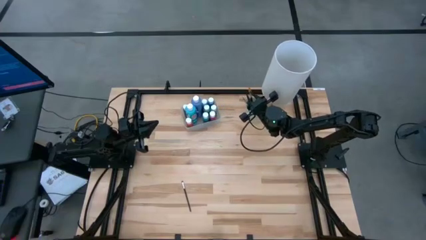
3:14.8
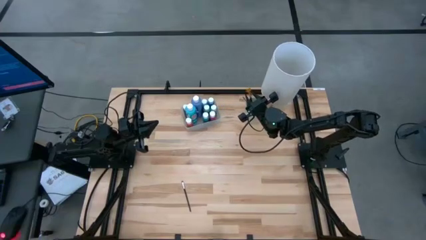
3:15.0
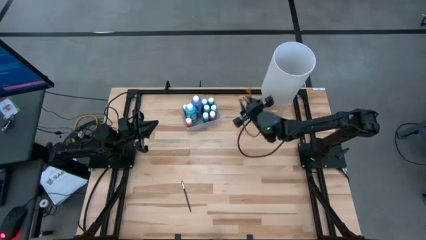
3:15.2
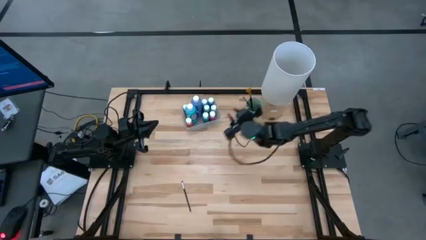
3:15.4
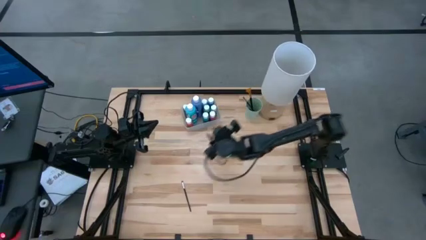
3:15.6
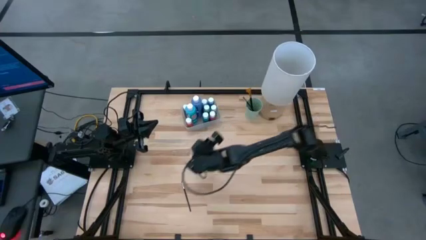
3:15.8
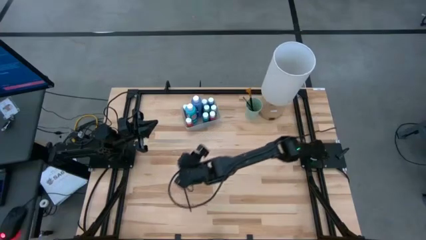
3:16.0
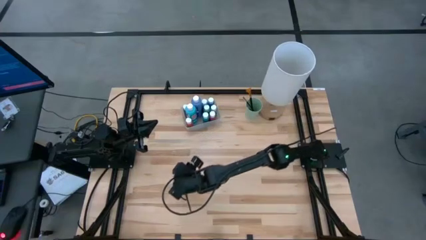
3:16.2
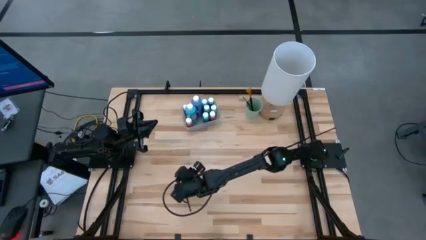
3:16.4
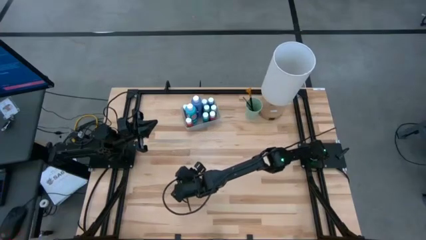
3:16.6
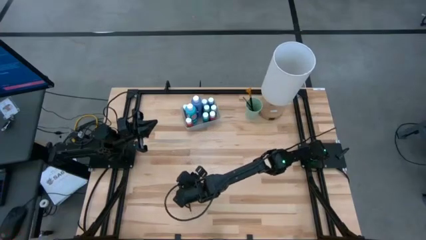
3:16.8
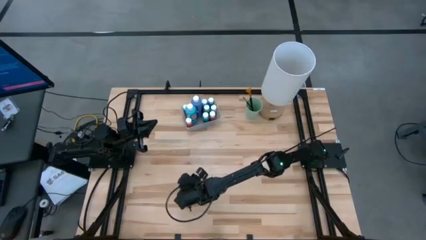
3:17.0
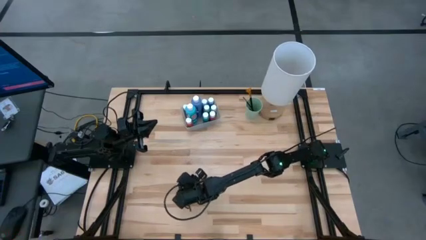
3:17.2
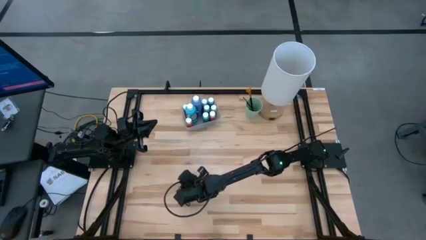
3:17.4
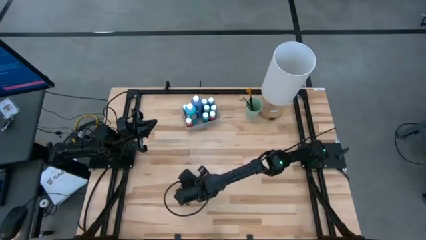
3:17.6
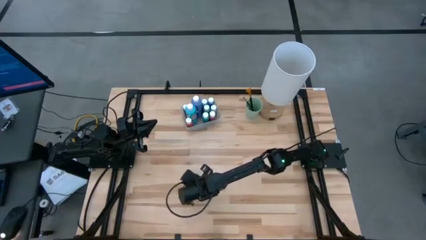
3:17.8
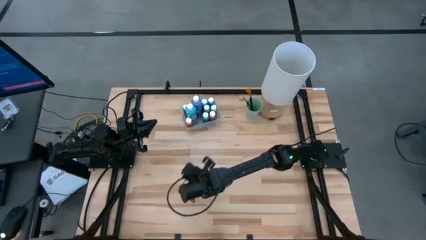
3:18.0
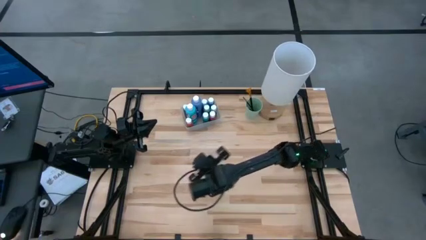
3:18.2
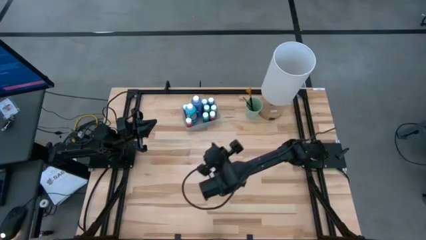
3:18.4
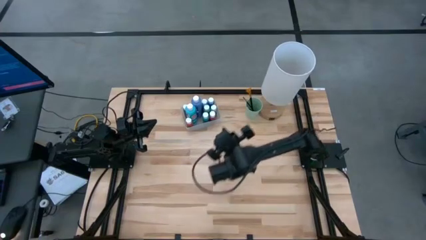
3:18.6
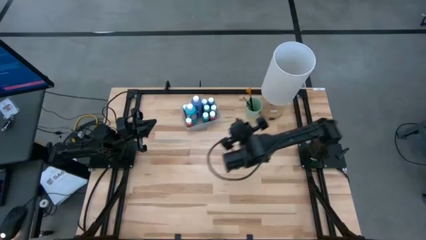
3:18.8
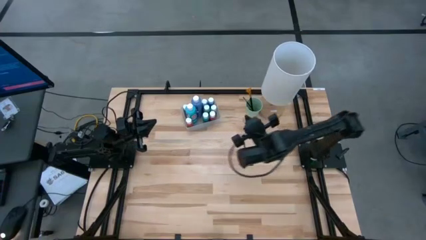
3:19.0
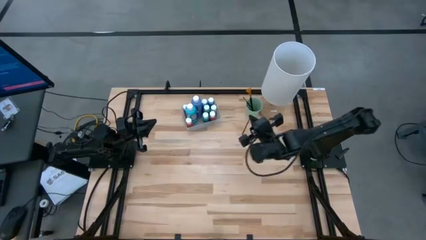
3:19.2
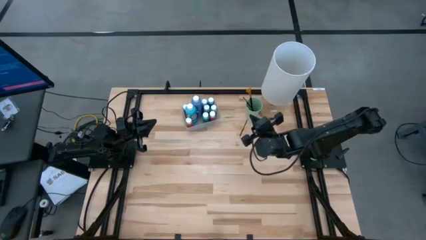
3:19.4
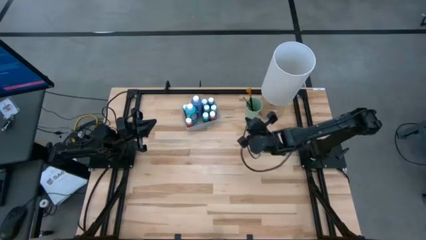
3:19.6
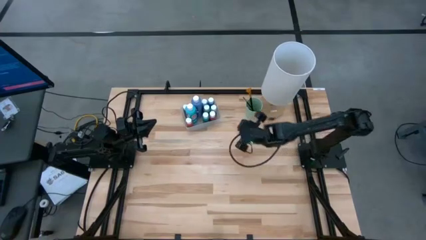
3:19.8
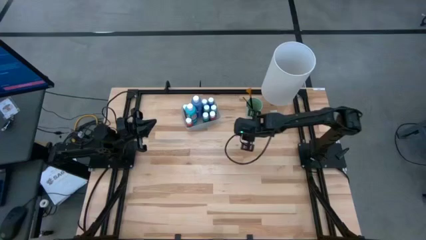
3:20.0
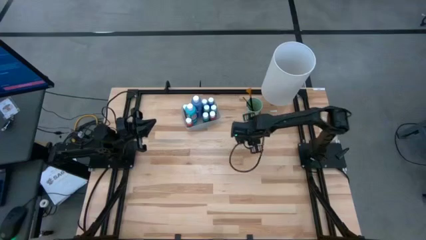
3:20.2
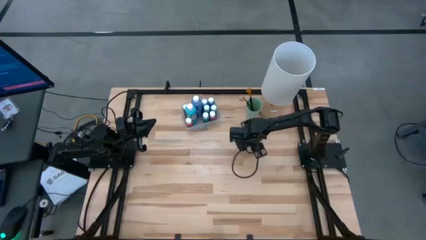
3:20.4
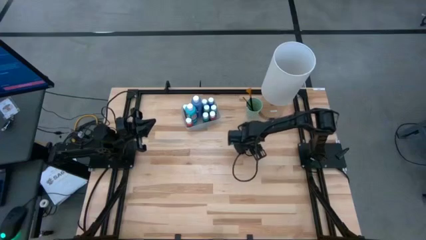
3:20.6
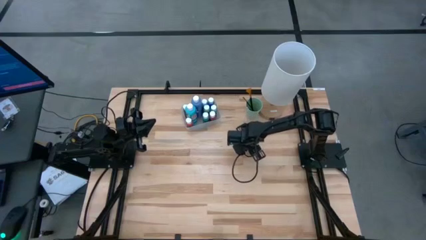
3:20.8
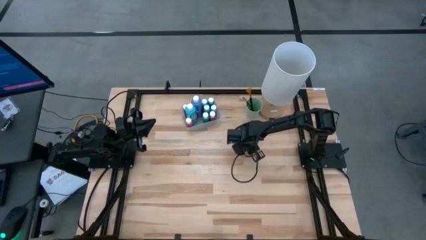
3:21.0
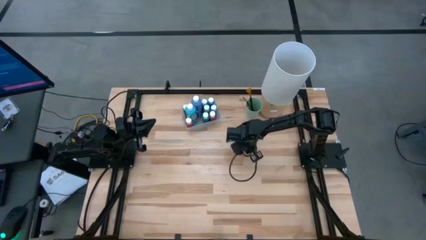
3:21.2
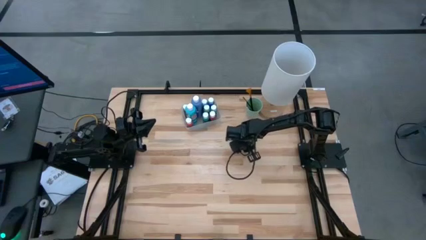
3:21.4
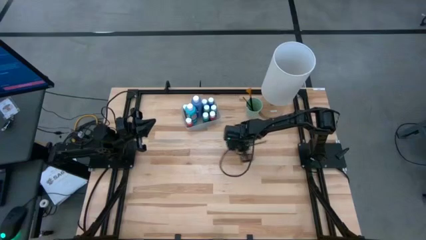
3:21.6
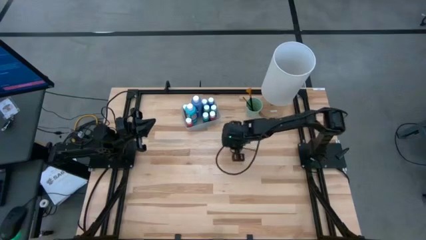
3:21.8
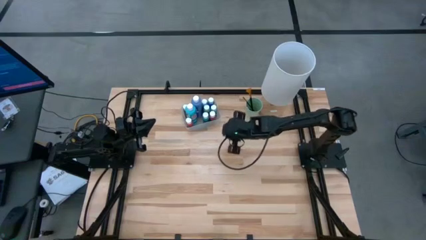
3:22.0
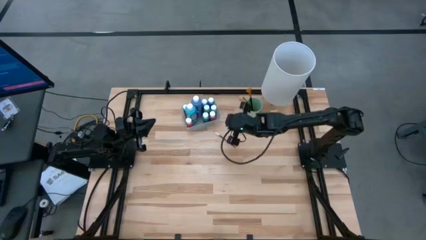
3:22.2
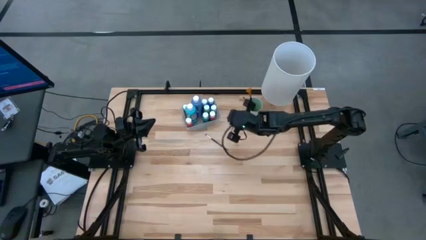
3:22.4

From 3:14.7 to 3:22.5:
Task: Pick & Place Paint Supplies
Put the silver paintbrush into the green cup

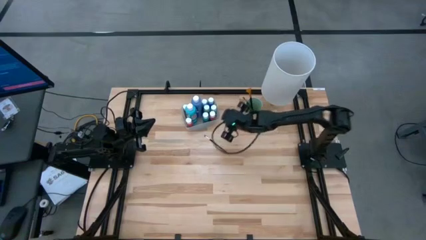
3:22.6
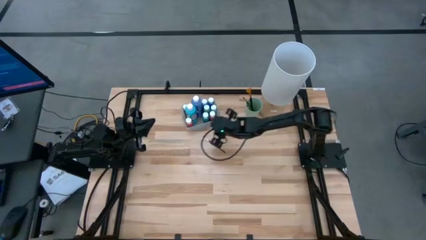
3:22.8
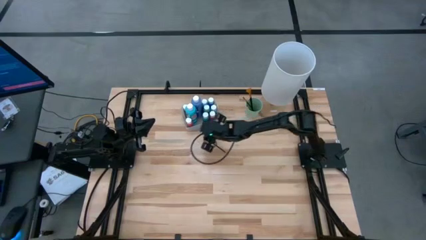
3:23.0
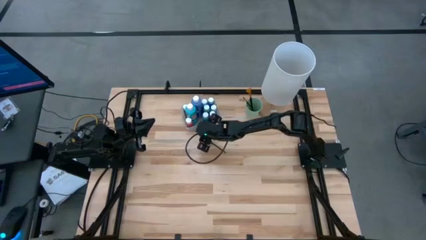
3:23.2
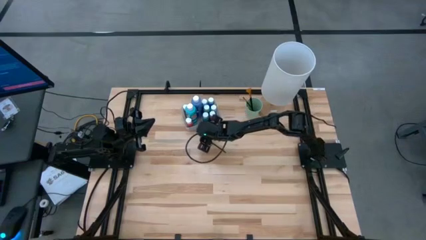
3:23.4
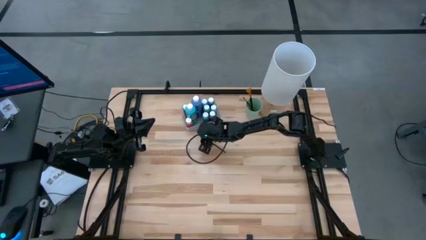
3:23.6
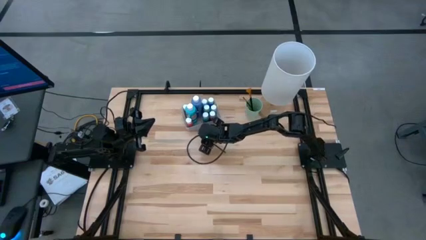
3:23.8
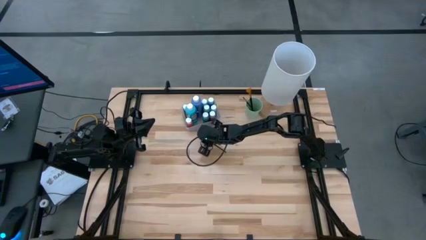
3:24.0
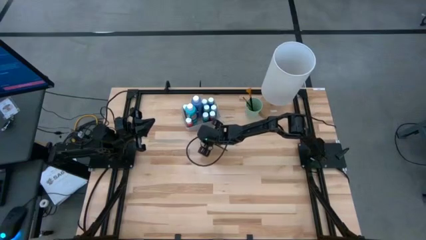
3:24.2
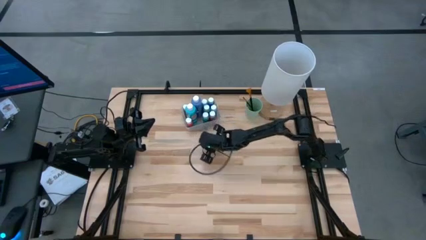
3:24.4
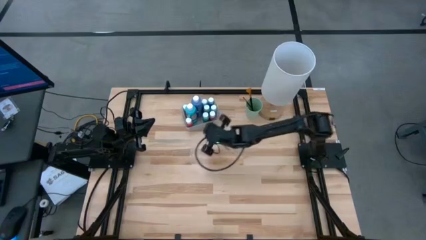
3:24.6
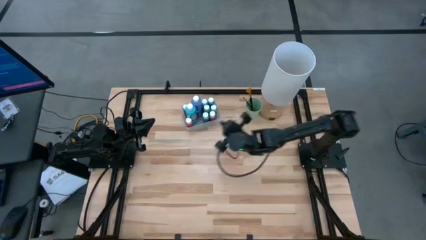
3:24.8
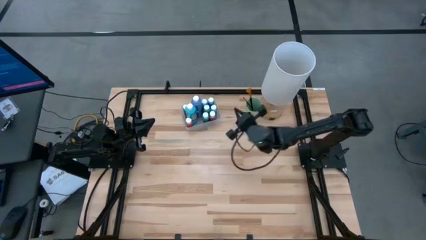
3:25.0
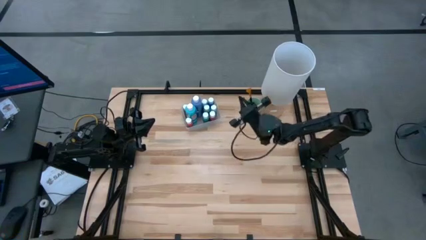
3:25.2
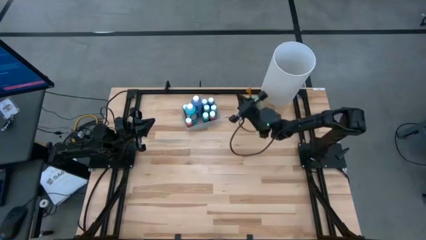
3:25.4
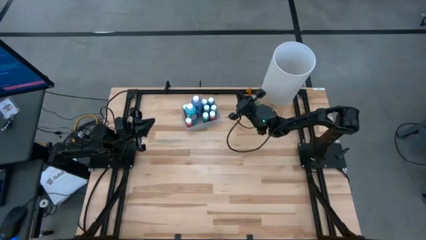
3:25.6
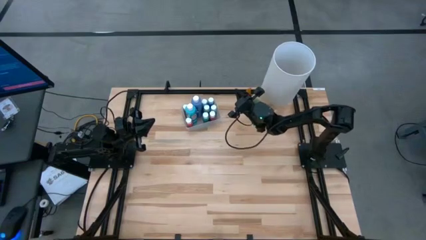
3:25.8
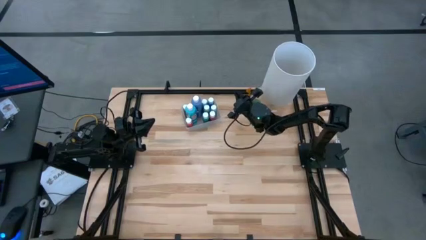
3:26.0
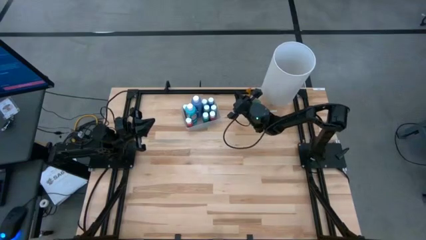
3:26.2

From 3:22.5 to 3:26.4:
Put the silver paintbrush into the green cup

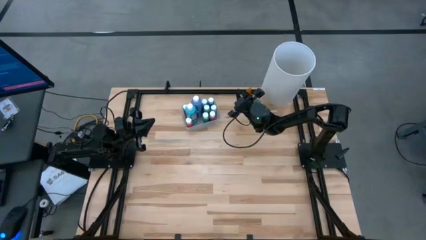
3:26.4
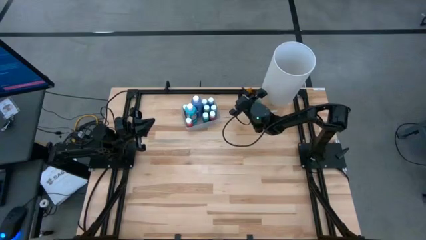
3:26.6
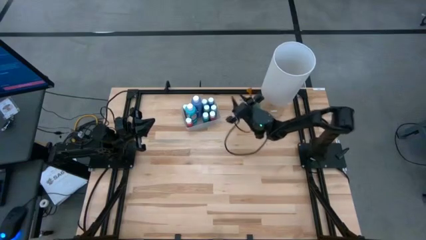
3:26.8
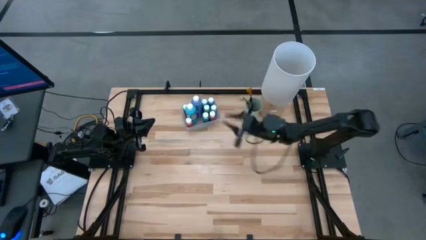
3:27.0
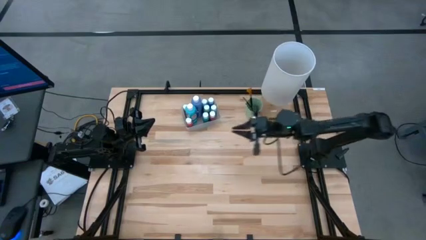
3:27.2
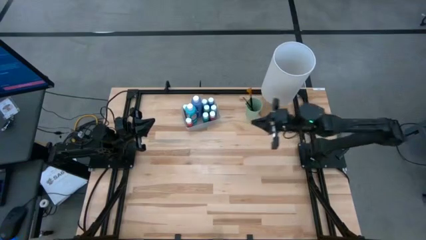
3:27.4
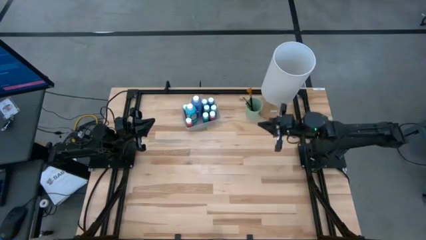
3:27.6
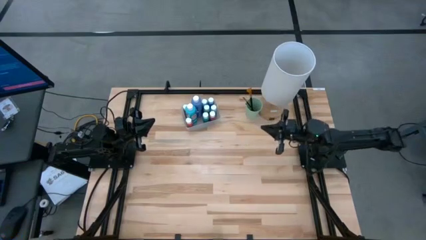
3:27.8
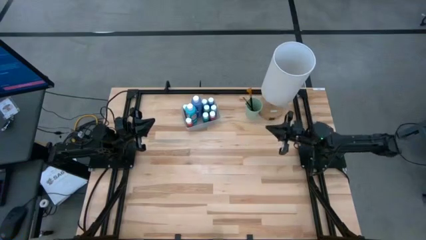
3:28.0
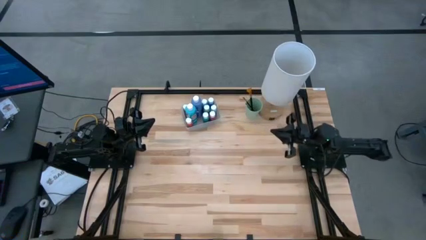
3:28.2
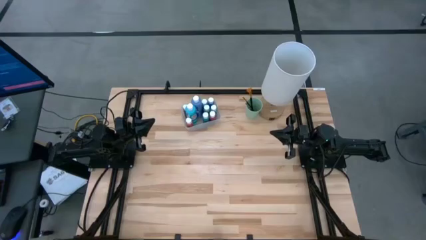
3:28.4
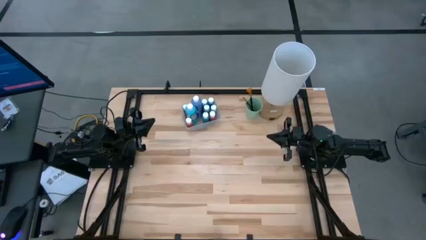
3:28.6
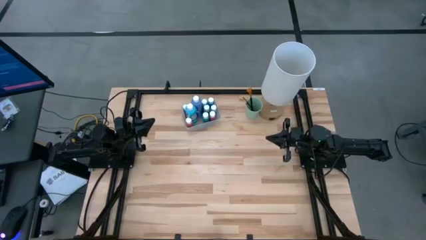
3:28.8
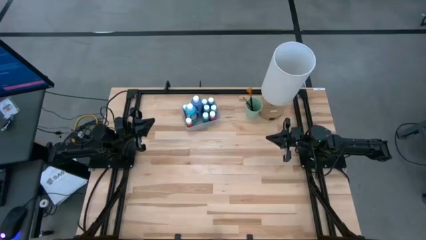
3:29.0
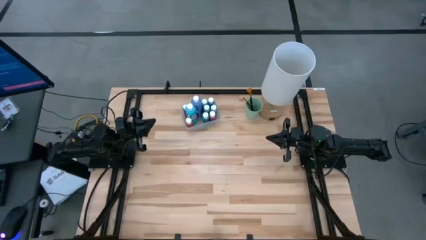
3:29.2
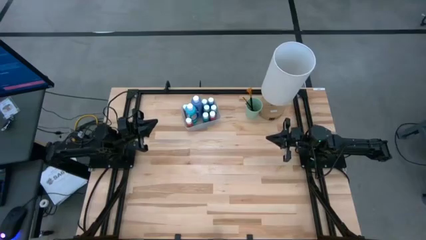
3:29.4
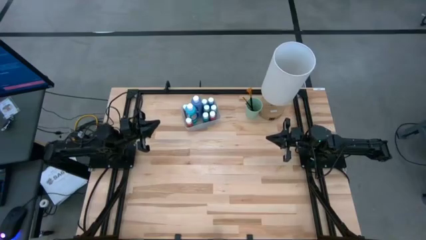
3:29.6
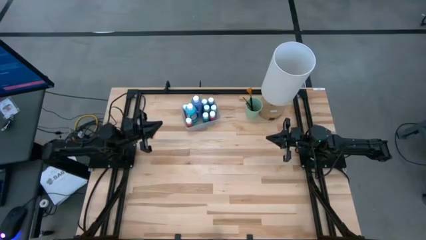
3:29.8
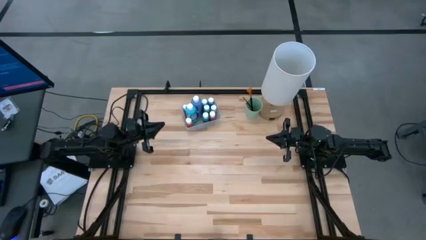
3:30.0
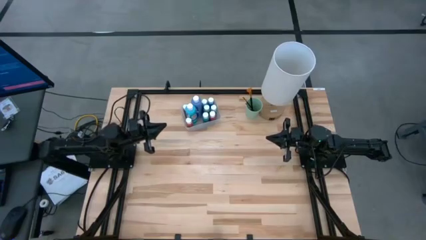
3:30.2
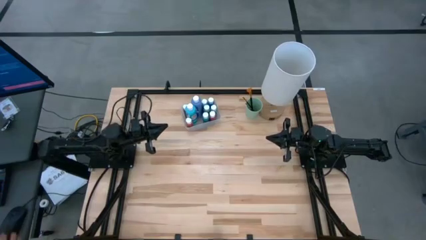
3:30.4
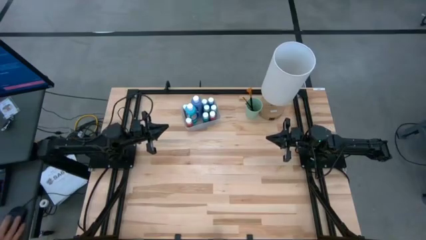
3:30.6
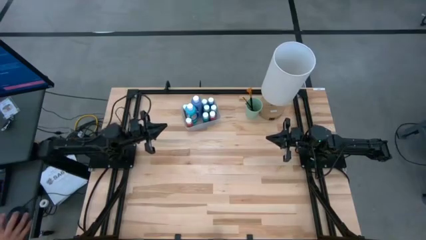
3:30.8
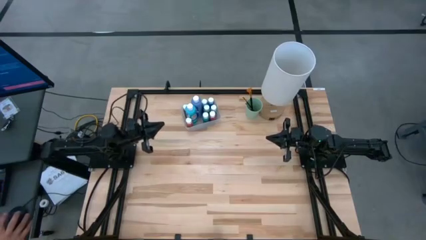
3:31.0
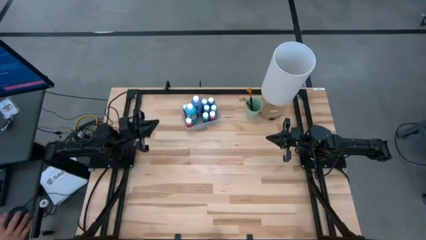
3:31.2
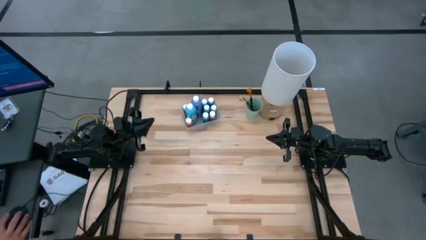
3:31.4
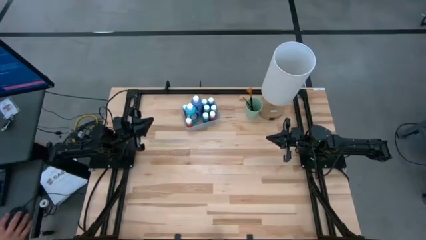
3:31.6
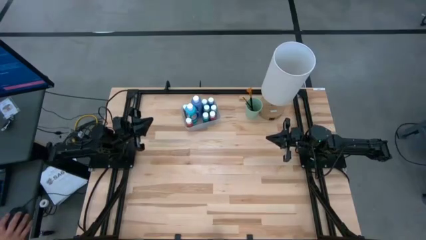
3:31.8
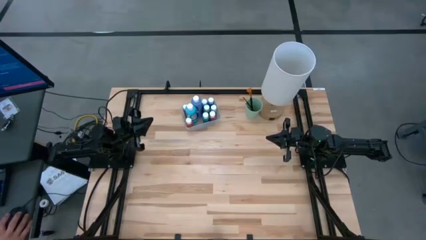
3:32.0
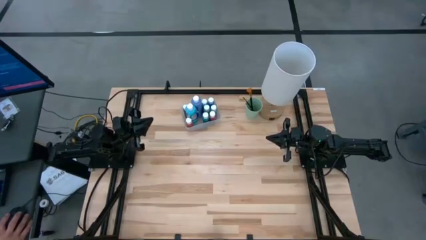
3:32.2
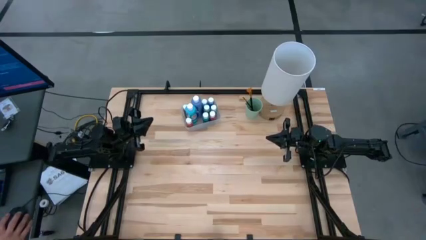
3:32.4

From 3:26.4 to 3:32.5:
Return to Home Position
